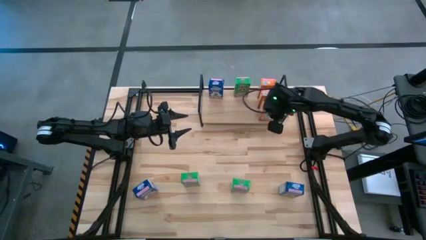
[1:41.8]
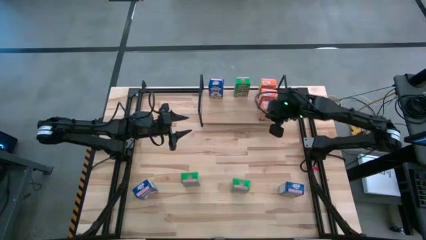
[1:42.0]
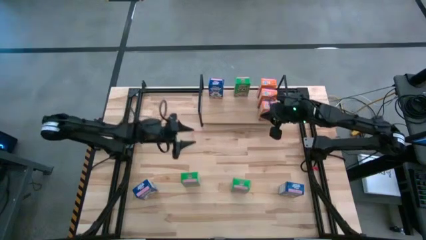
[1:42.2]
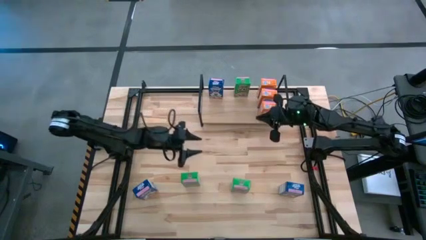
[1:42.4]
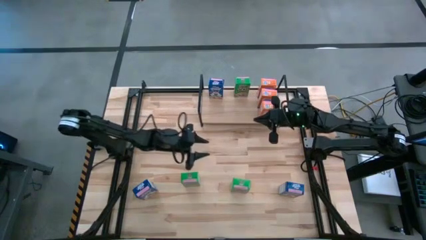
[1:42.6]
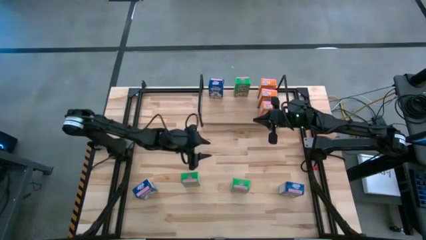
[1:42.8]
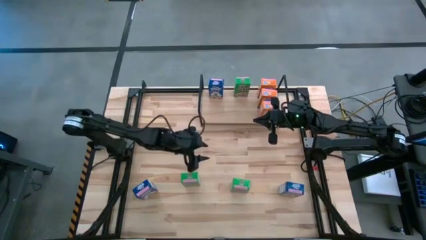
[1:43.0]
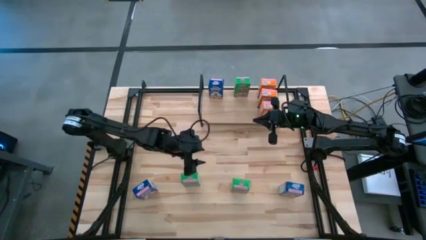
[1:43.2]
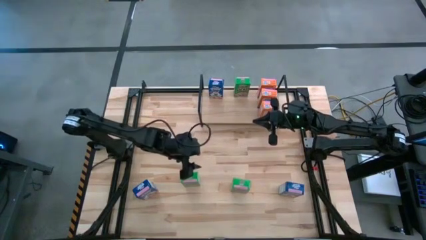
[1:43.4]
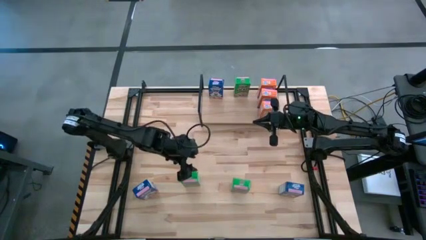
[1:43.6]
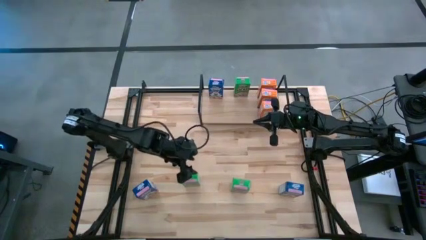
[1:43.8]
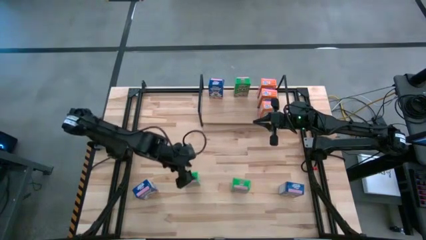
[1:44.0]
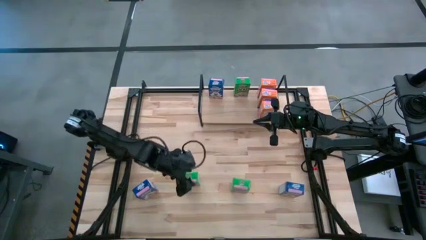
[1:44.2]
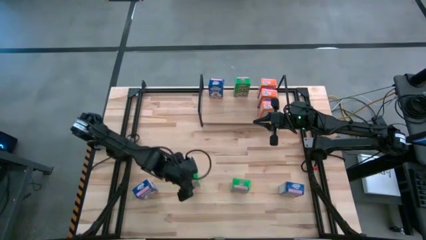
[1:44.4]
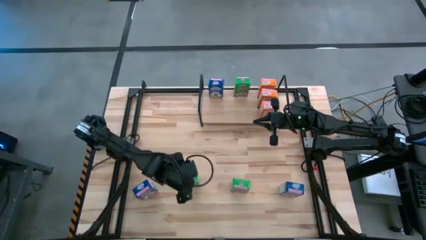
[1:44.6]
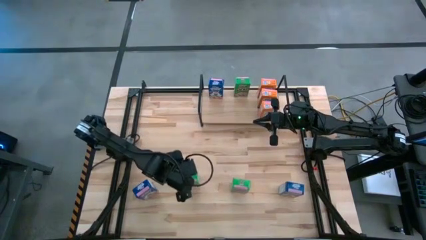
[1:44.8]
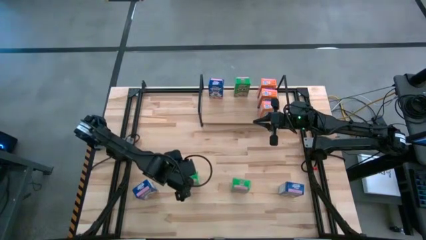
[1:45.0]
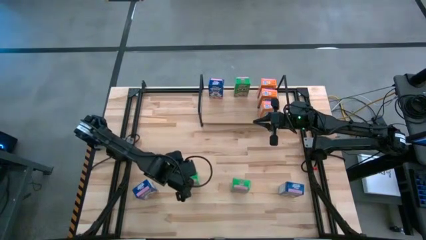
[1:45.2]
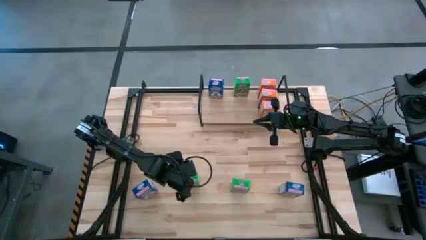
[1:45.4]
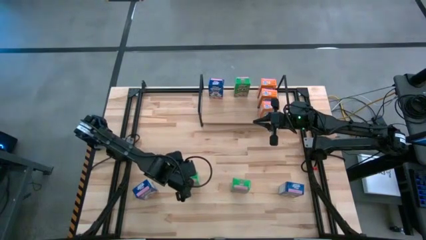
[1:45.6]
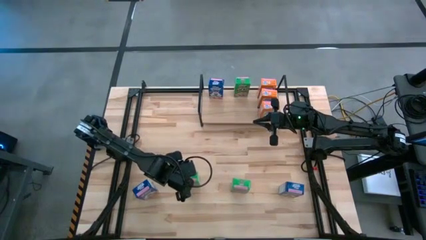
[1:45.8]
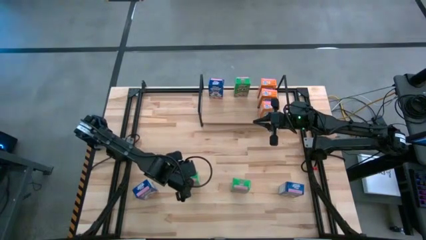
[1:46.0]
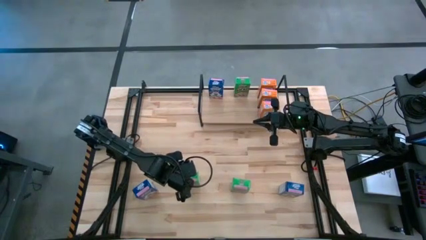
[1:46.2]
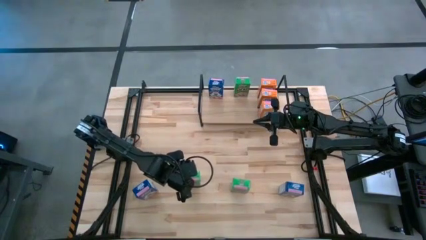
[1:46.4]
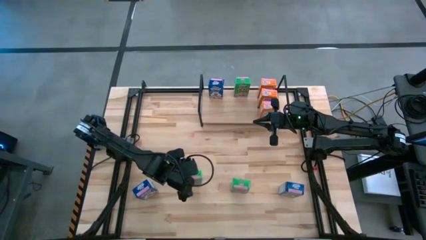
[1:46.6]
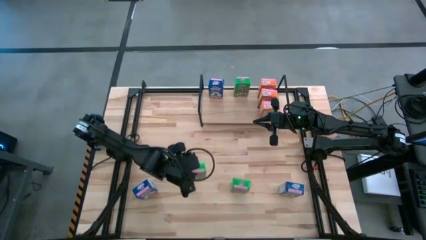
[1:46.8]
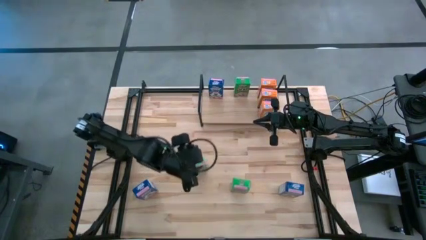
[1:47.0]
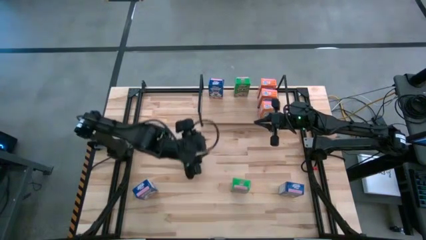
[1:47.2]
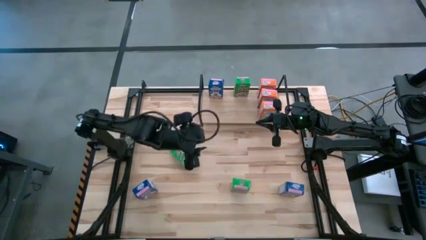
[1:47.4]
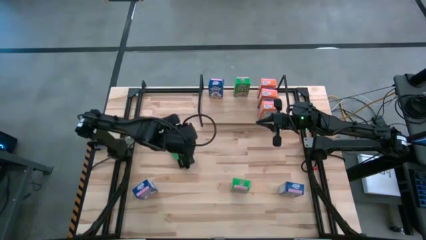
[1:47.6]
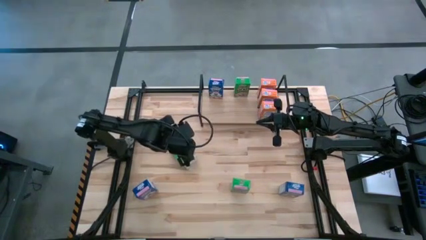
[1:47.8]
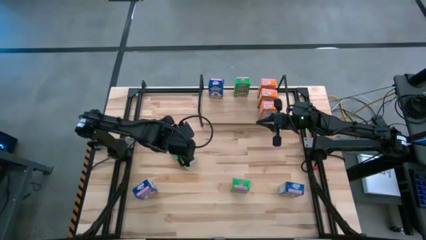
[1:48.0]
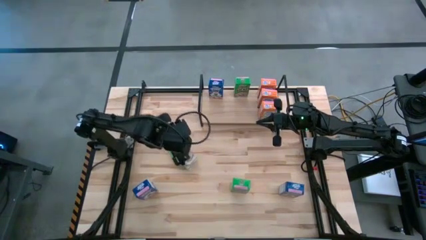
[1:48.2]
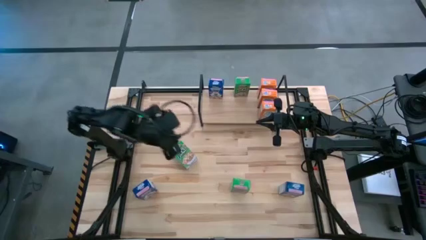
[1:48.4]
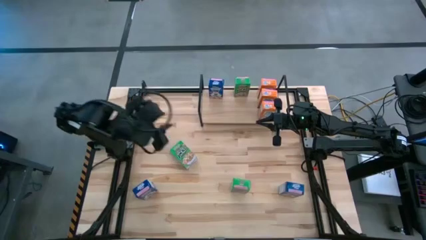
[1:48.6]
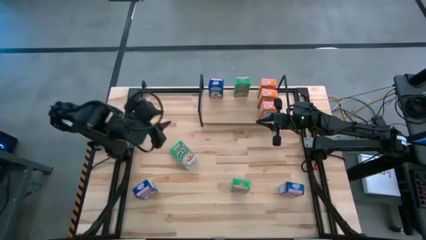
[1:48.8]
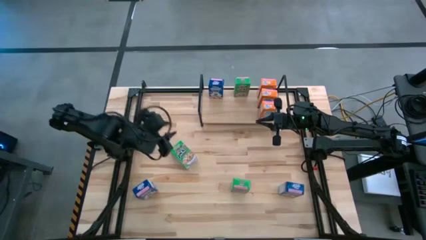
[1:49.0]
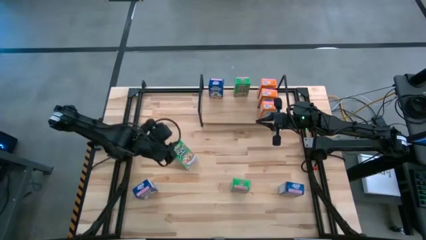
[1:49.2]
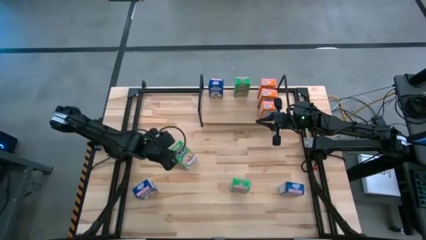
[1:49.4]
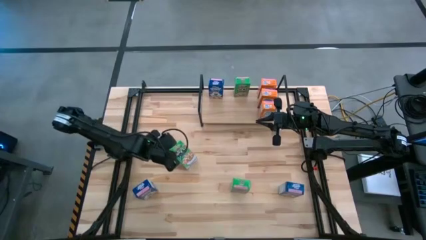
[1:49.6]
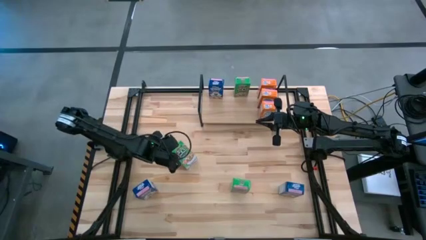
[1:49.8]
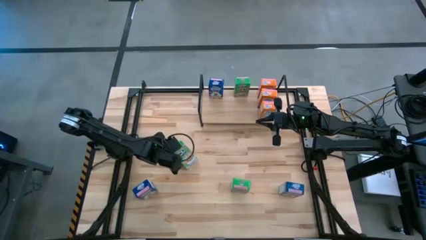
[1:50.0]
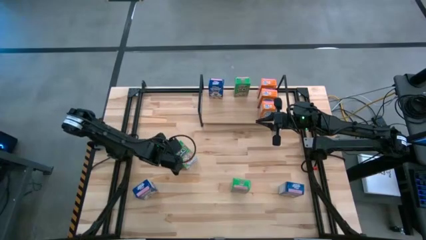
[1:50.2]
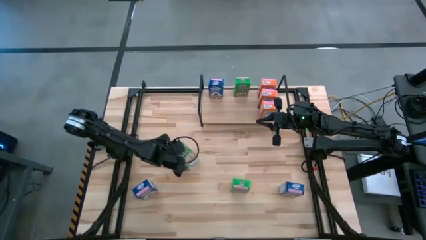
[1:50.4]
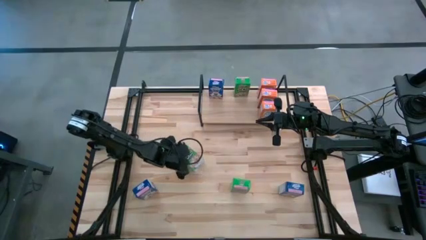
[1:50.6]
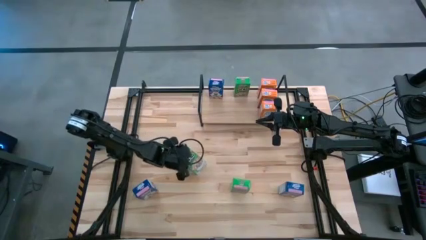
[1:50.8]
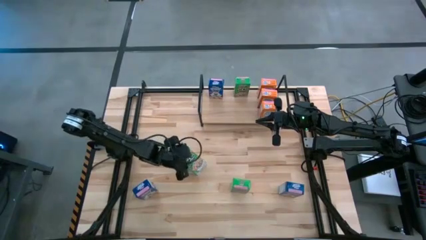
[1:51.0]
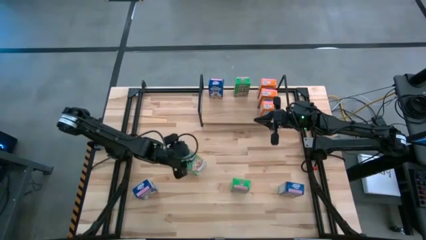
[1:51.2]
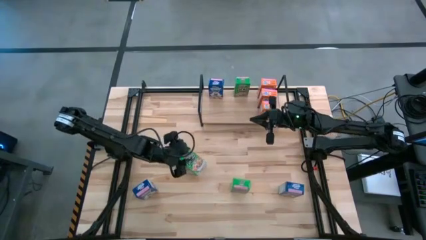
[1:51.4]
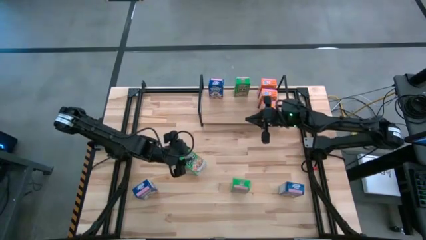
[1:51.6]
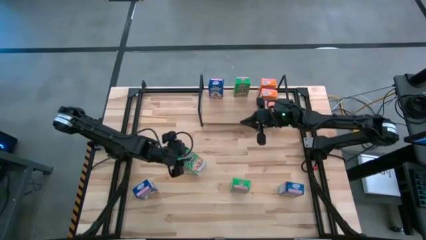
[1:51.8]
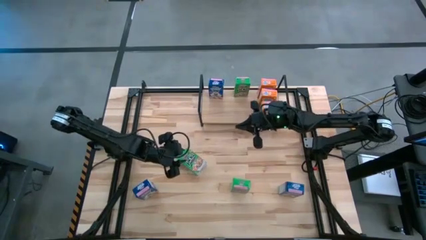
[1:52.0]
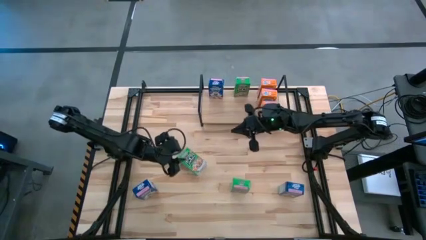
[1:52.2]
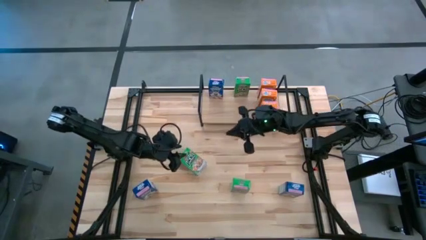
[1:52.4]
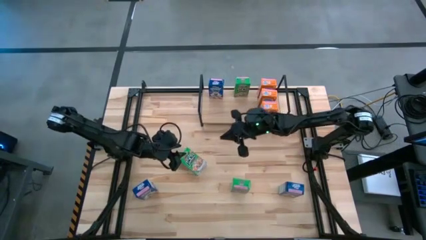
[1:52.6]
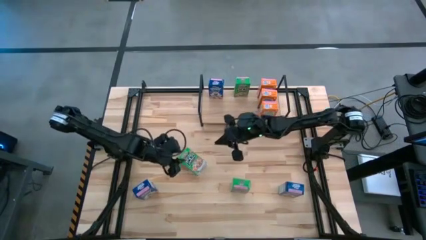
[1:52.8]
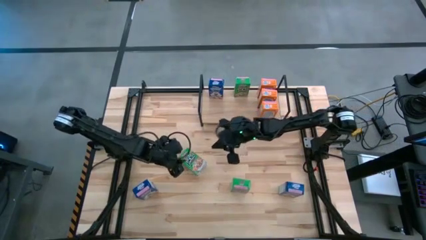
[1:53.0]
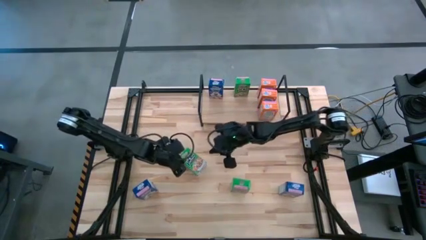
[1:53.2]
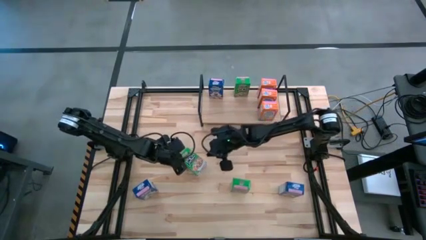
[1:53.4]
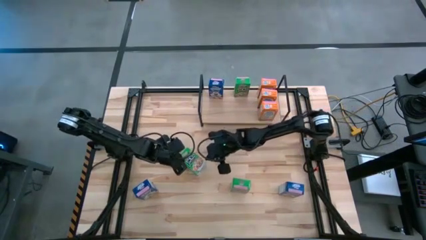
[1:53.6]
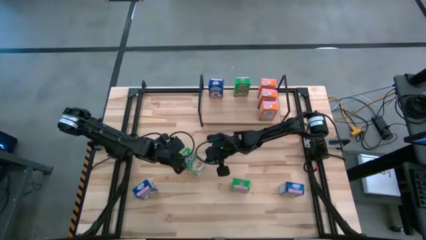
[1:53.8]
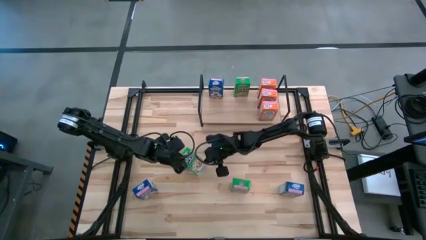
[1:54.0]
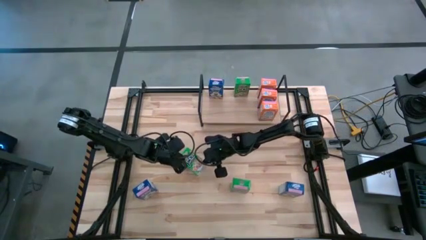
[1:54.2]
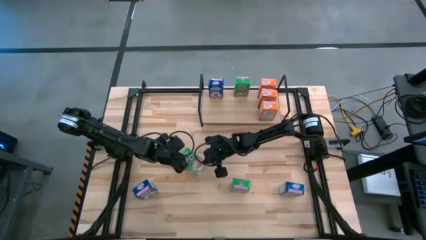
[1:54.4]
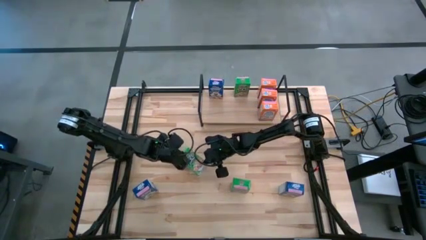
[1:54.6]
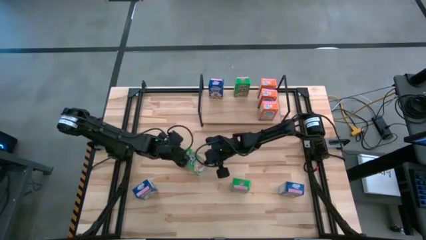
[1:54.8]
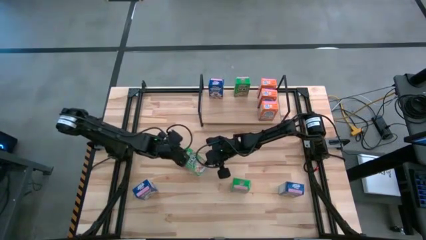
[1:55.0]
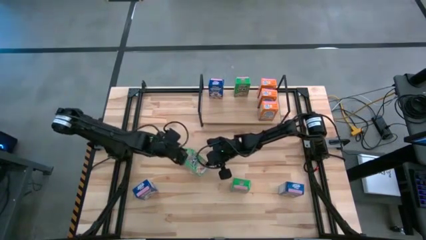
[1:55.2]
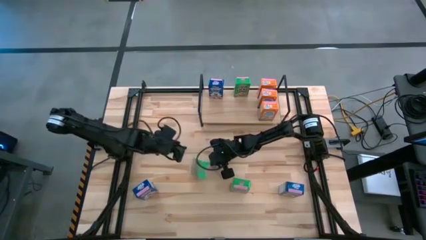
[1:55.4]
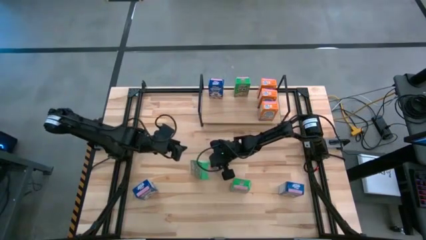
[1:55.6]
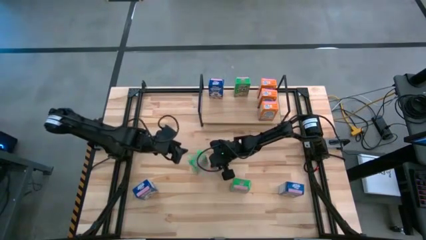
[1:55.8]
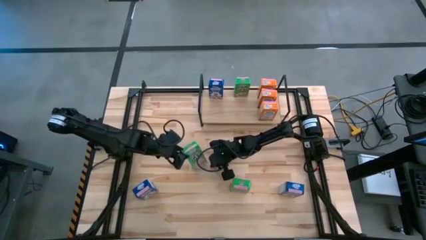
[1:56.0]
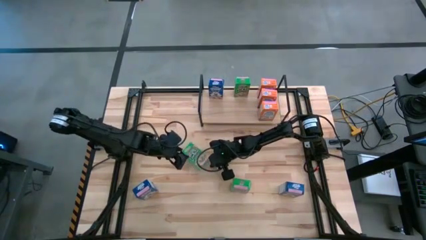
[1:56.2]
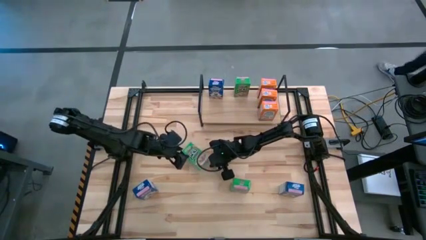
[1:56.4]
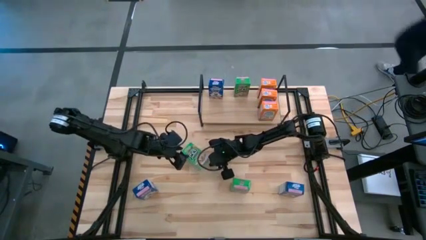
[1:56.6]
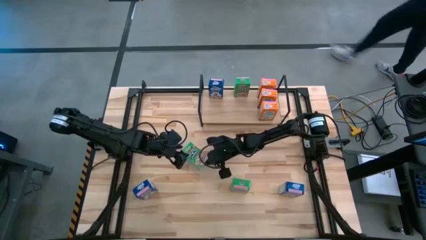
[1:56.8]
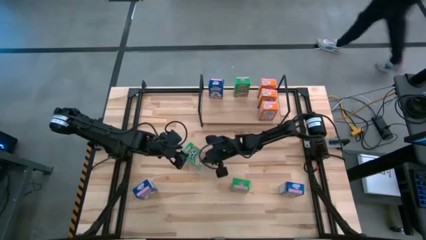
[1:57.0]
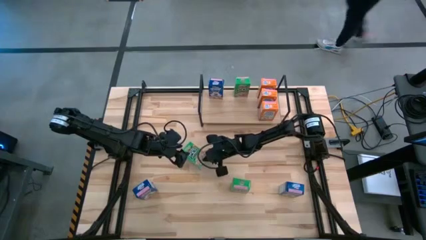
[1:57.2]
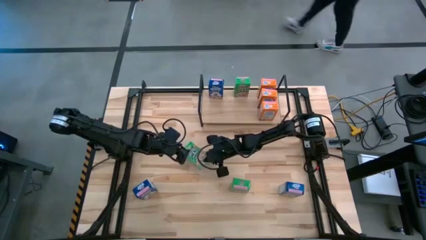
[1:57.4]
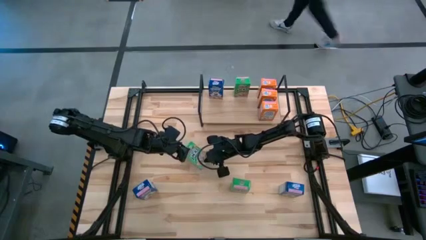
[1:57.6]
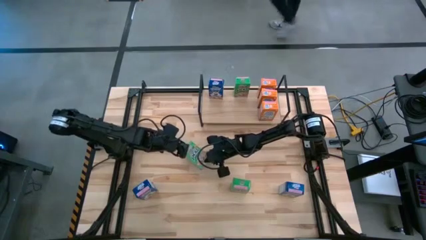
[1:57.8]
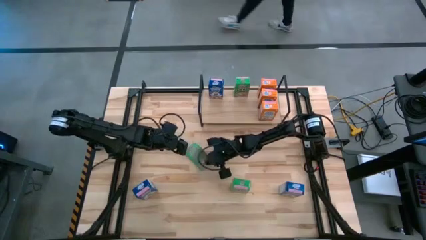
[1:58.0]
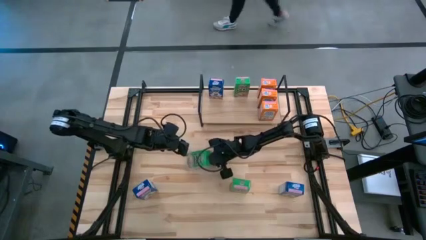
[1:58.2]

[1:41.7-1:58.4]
Task: Stack cereal on shelf
Put the left green cereal box aligned with the other green cereal box on the shelf
